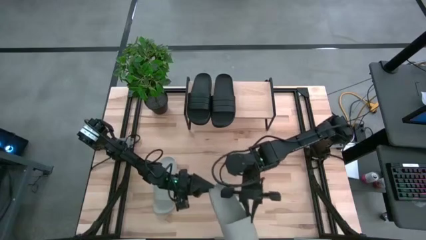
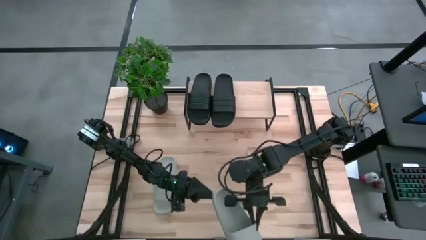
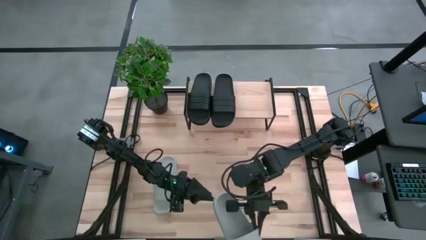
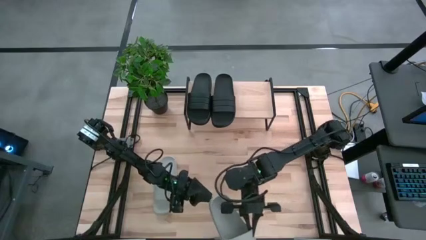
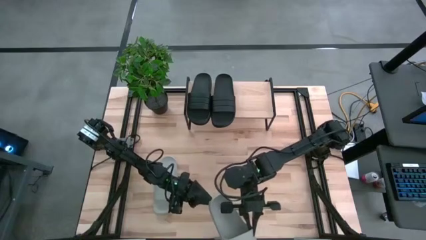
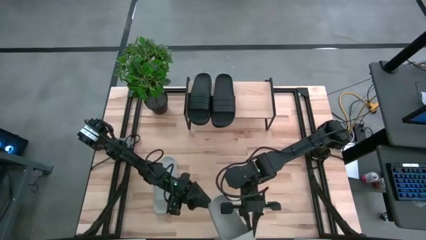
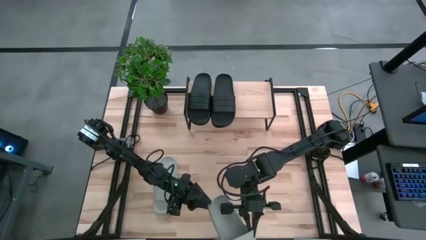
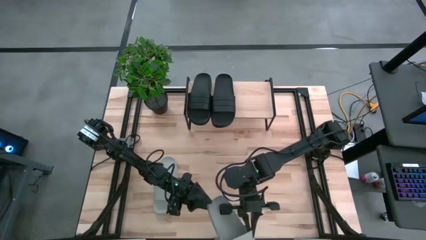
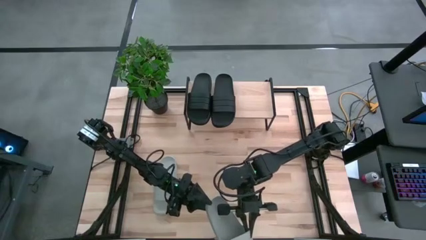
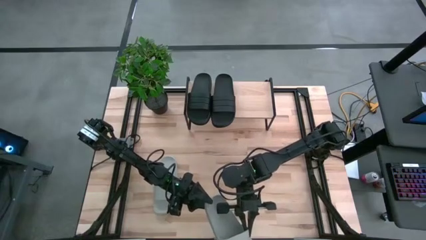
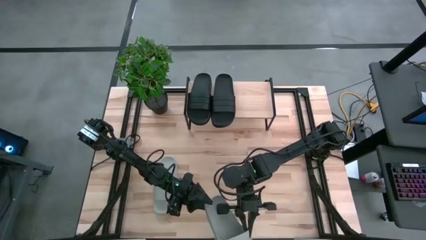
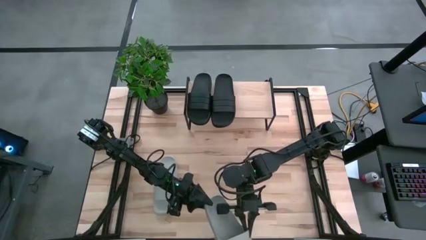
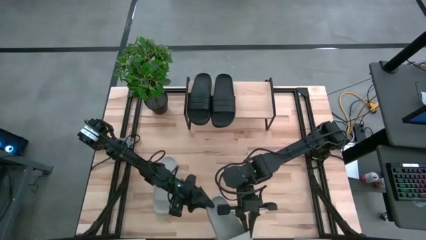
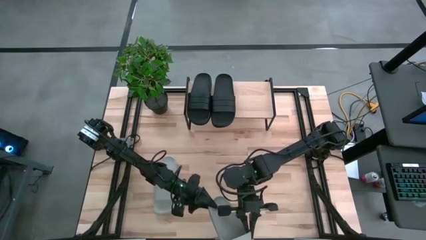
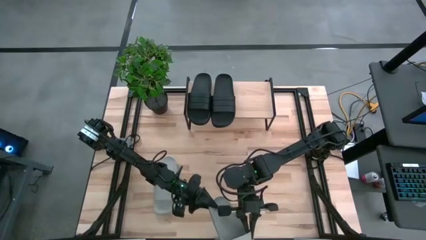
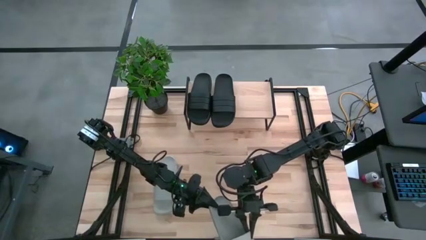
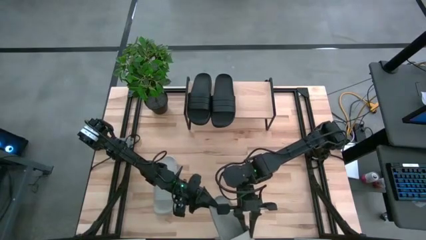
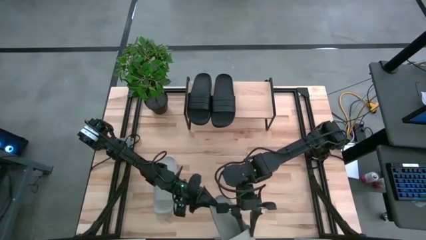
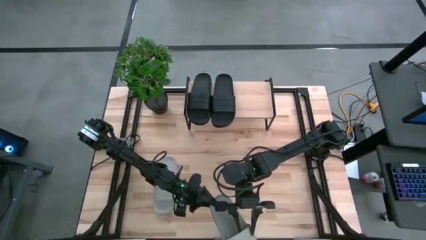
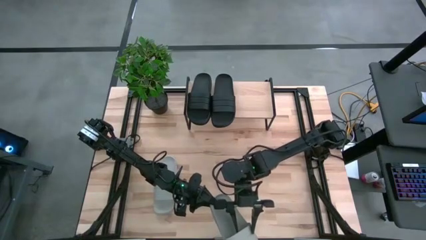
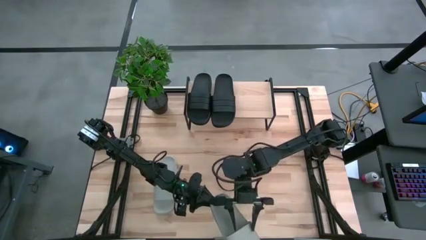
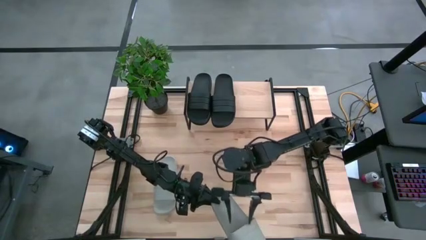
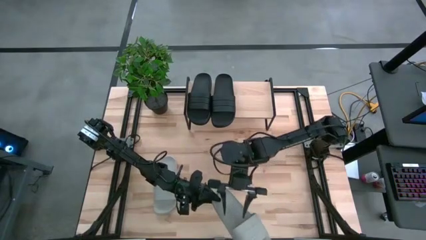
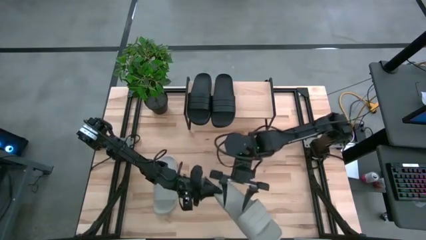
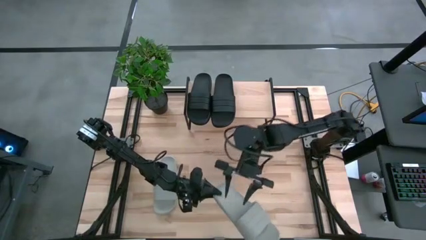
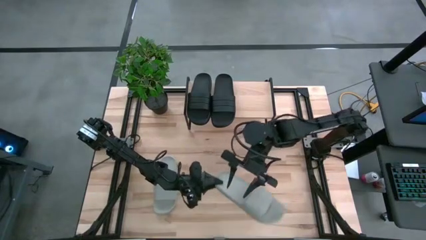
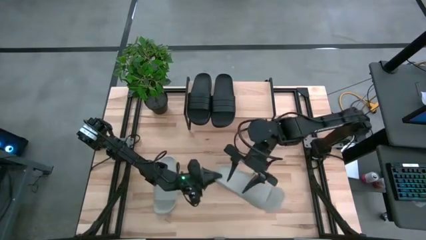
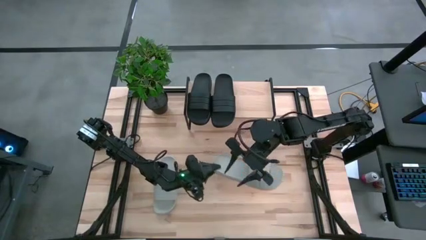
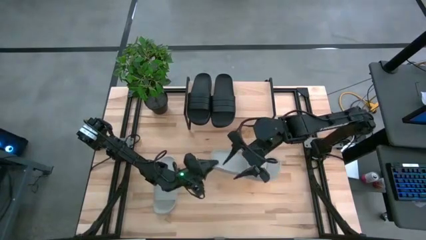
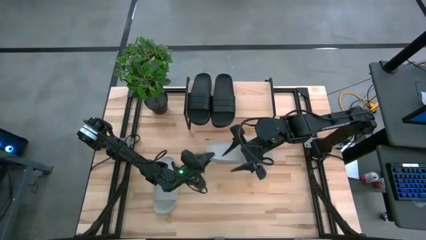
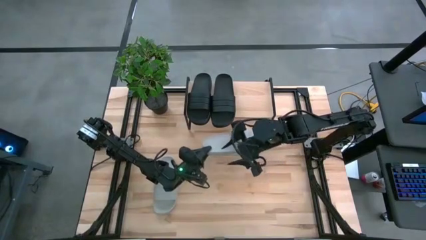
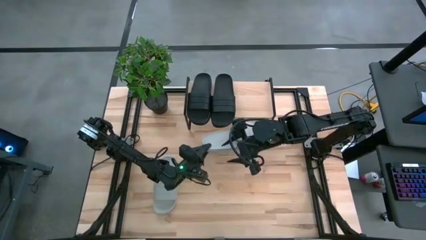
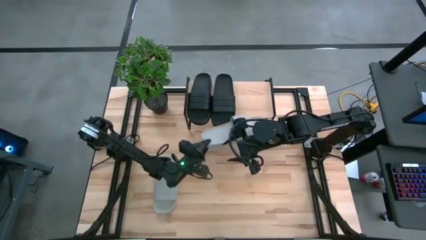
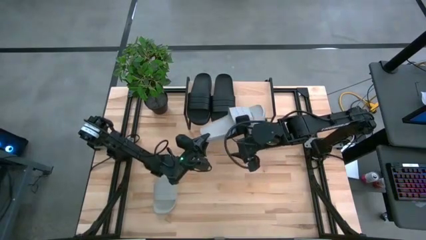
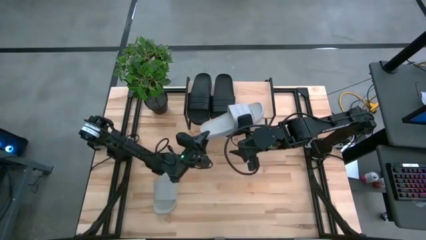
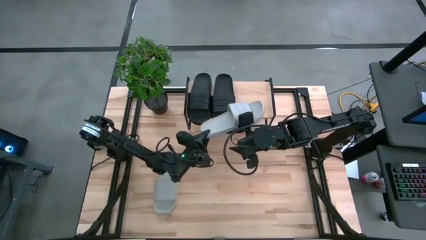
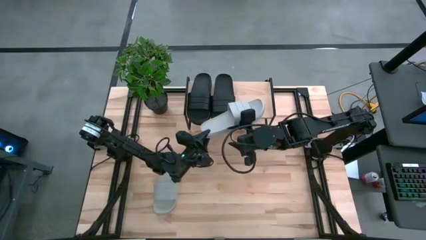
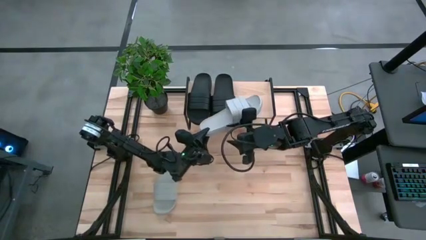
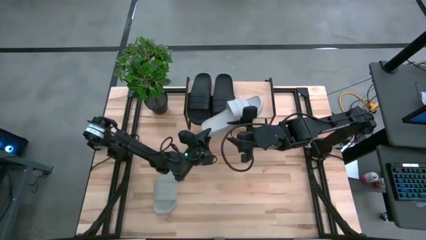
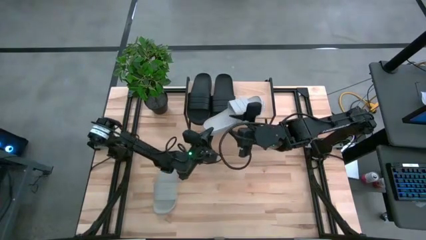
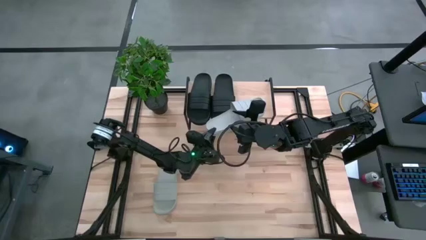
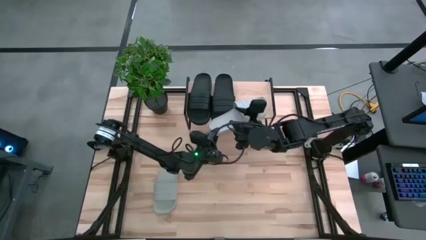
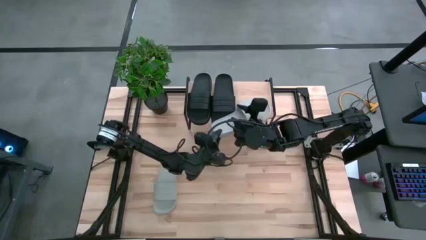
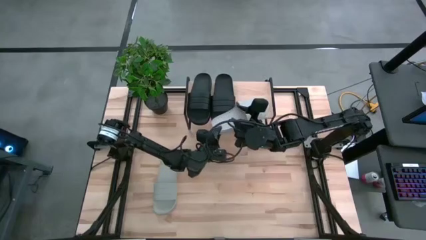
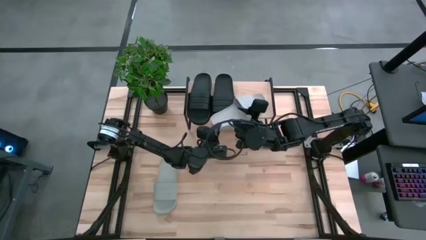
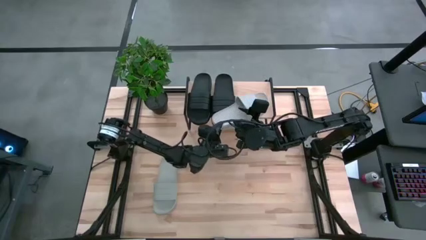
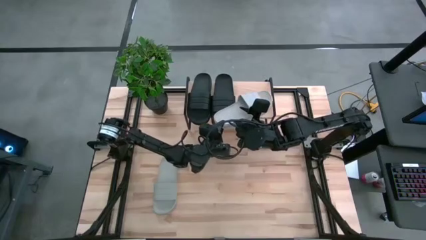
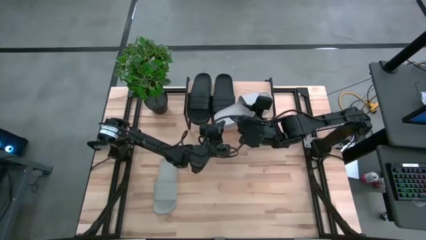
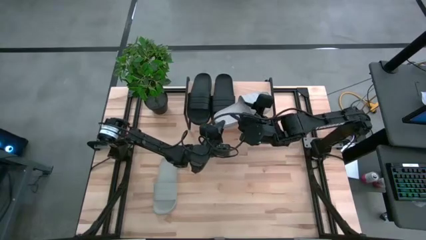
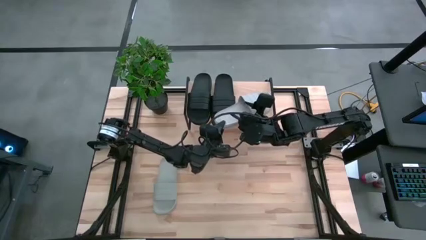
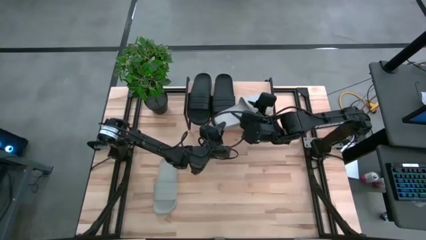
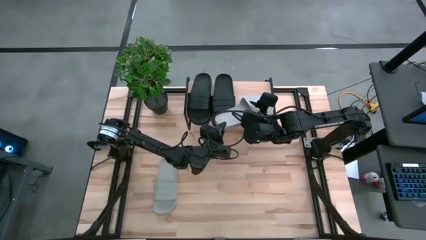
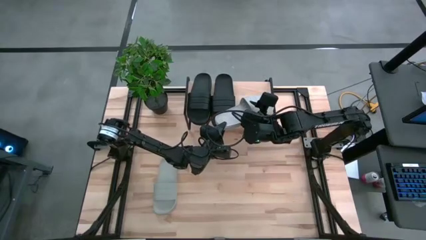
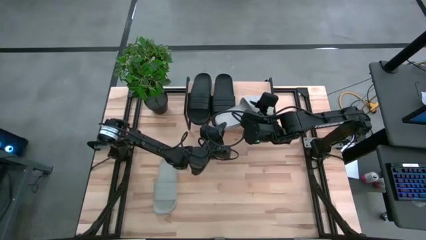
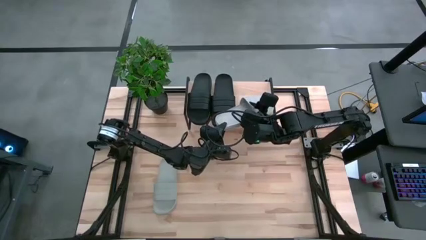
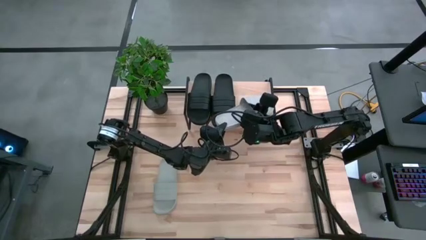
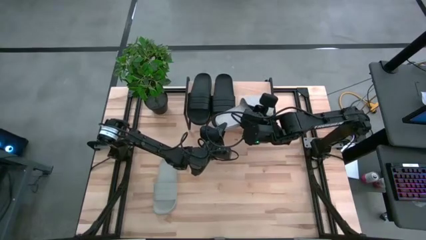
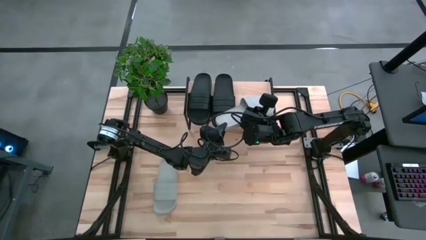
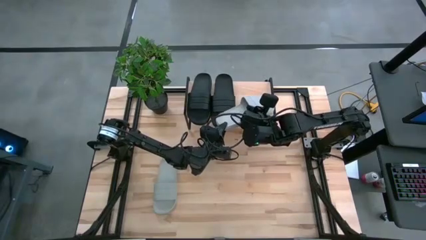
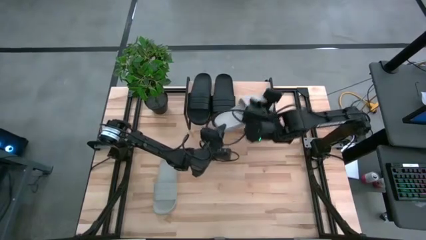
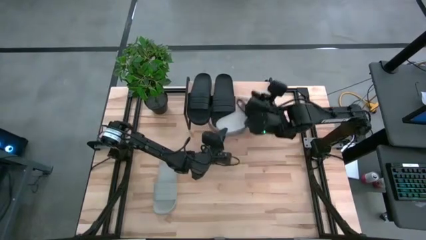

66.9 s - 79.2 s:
Task: Pick and place slides into the shelf
Put the right gray slide on the shelf

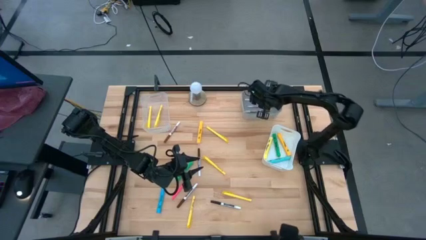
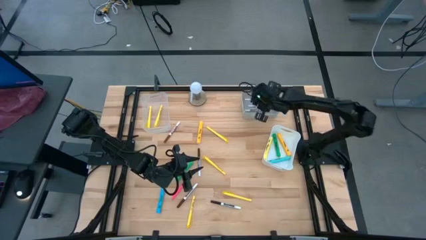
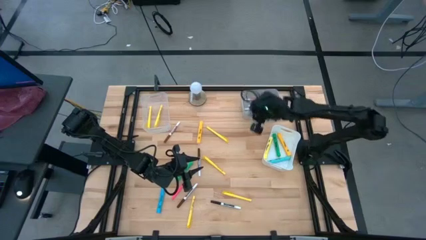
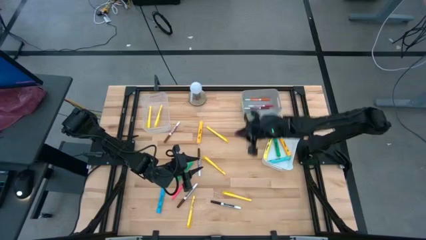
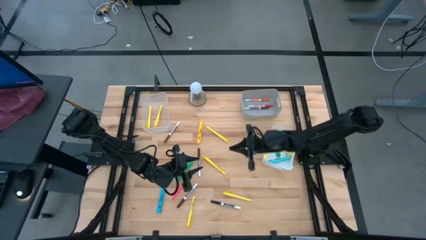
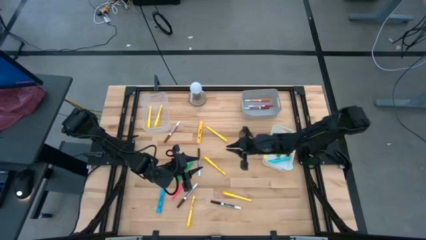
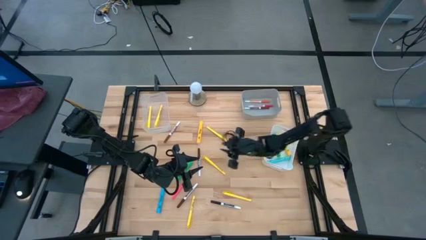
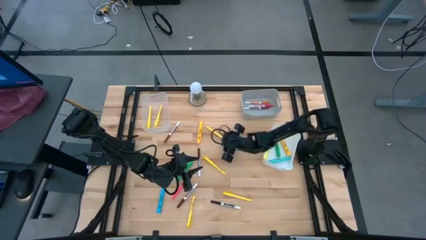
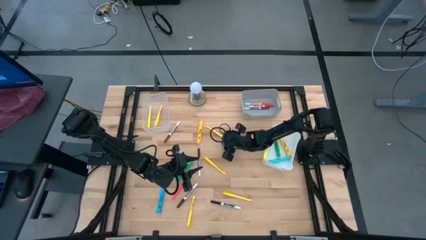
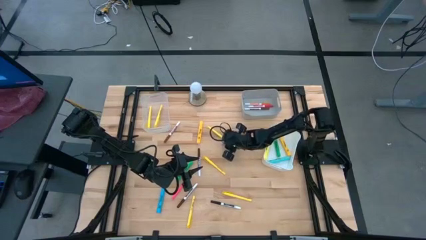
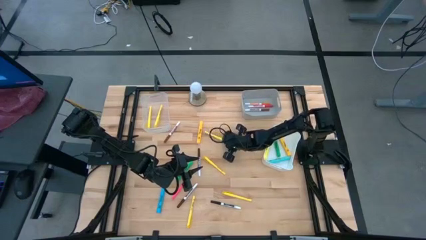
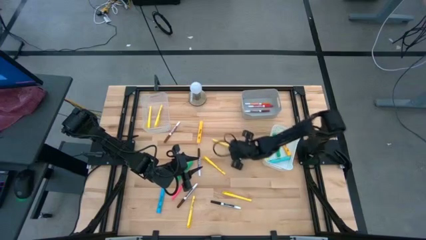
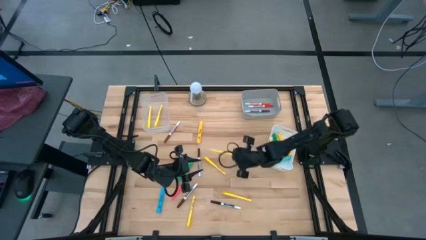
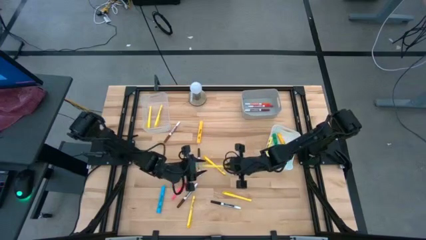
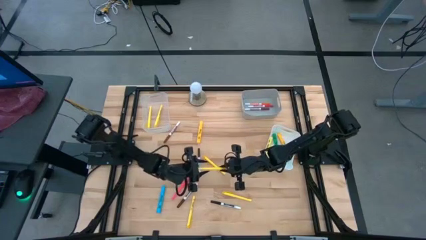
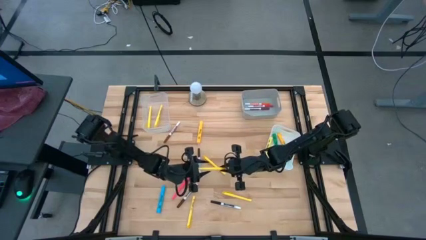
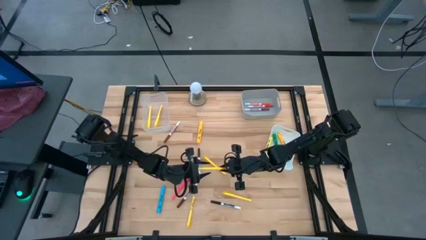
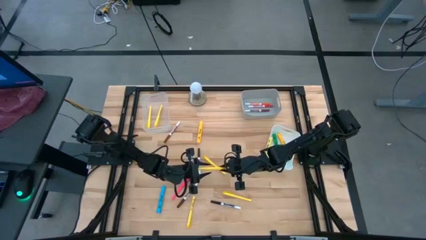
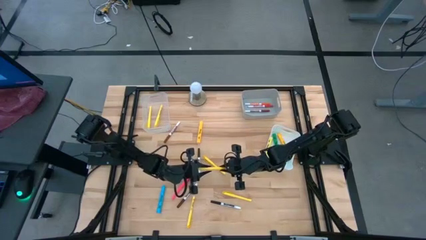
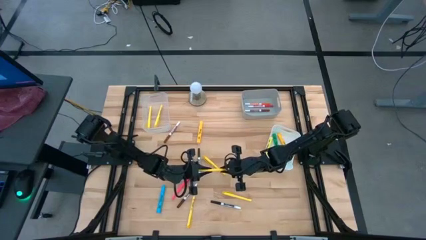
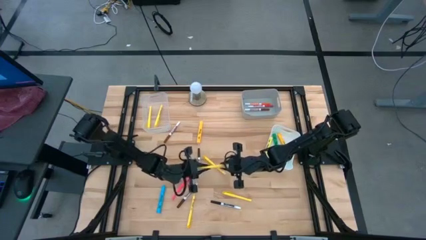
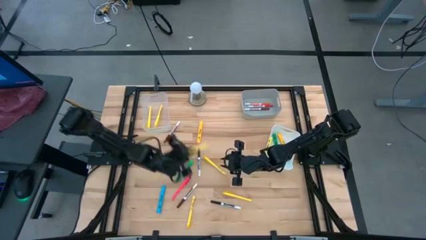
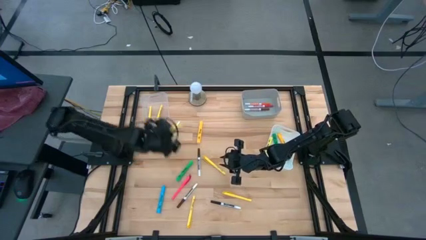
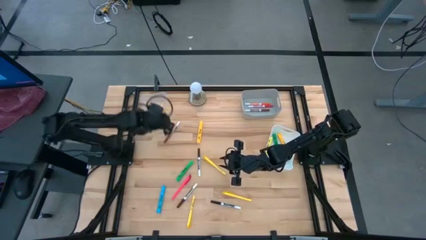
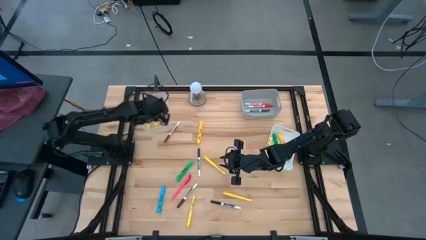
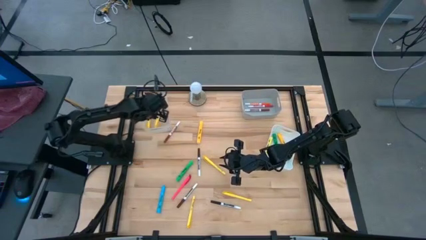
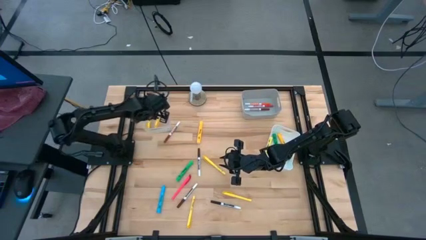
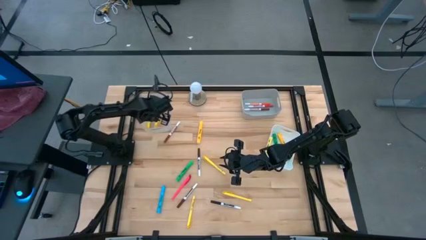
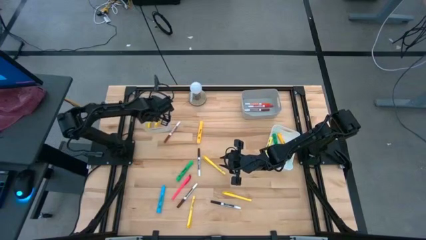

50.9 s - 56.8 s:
Task: Pick & Place Markers
Put the yellow pen into the transparent bin
